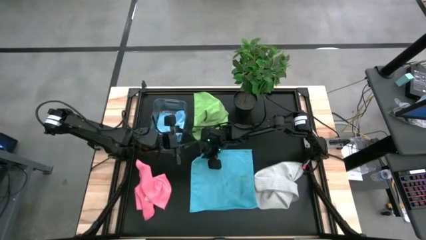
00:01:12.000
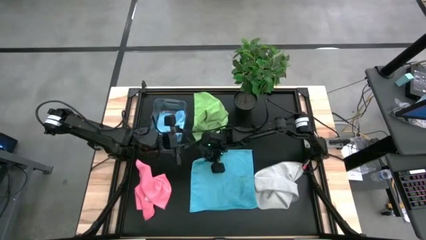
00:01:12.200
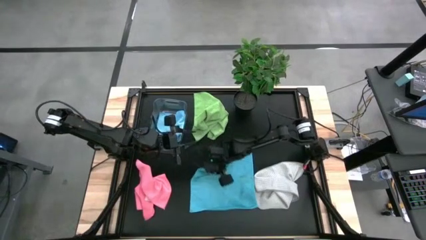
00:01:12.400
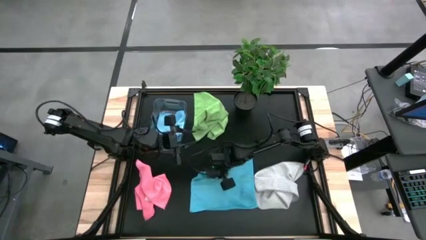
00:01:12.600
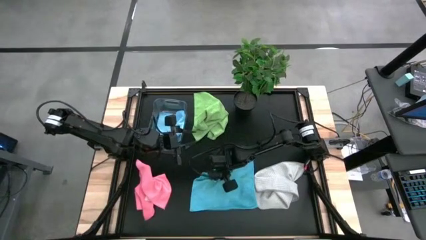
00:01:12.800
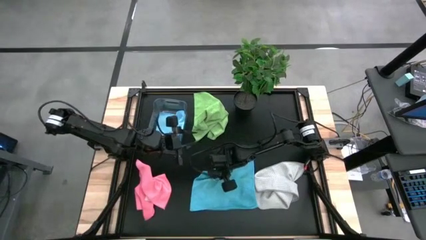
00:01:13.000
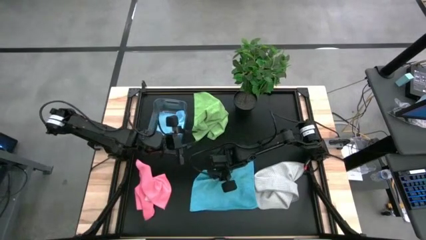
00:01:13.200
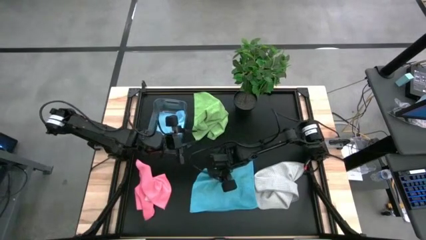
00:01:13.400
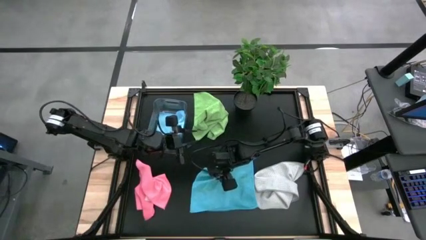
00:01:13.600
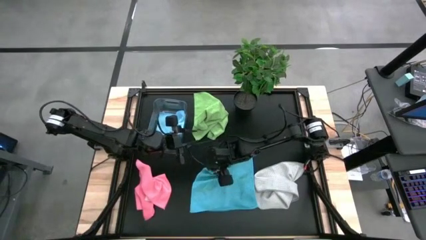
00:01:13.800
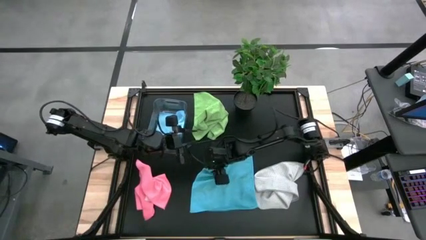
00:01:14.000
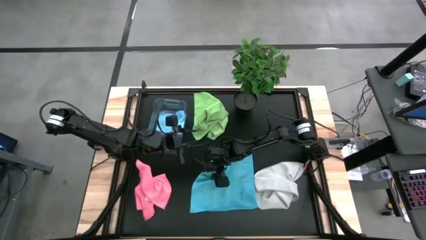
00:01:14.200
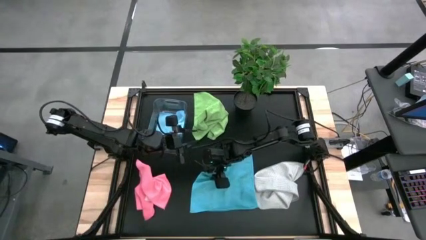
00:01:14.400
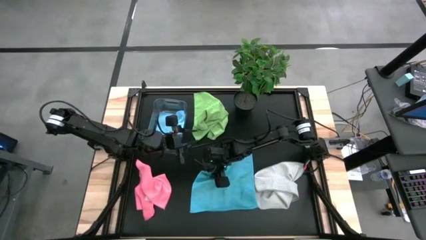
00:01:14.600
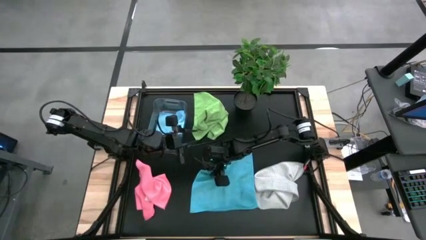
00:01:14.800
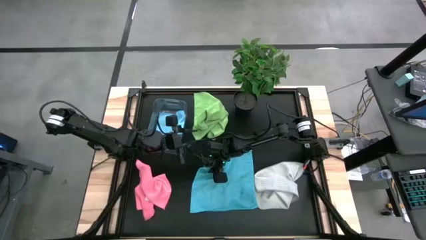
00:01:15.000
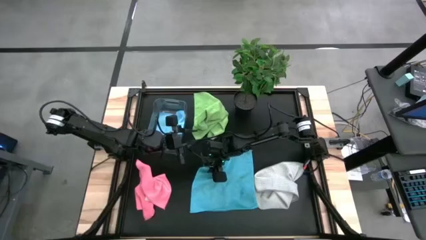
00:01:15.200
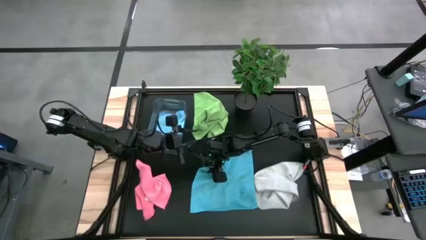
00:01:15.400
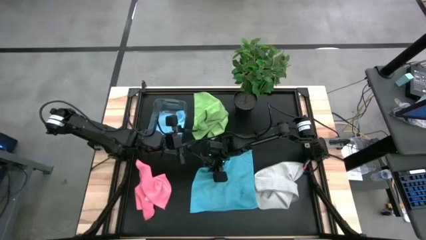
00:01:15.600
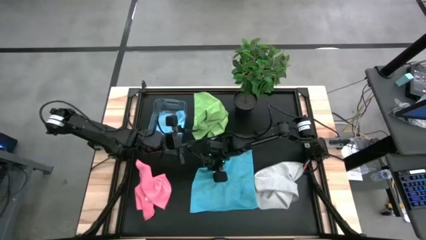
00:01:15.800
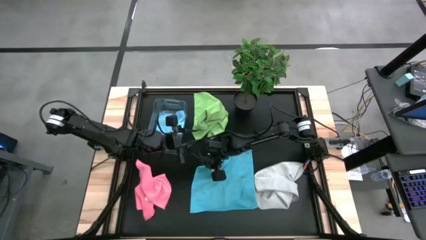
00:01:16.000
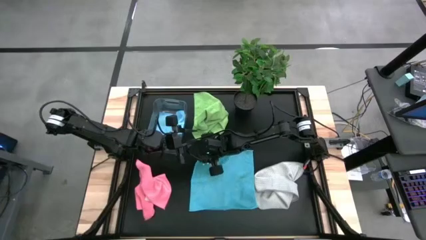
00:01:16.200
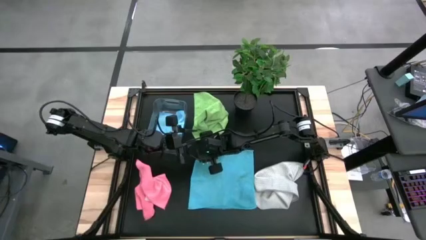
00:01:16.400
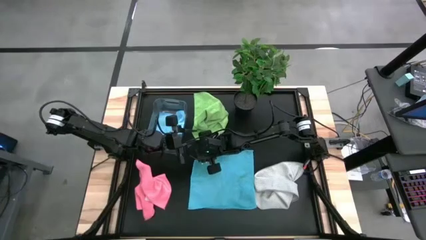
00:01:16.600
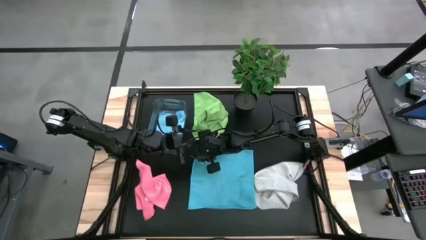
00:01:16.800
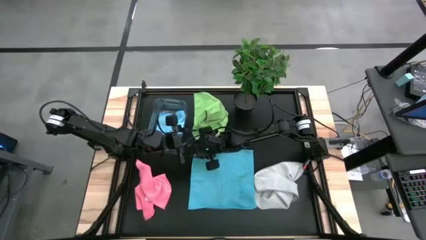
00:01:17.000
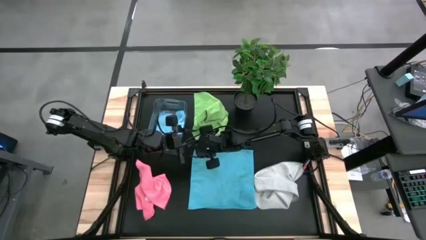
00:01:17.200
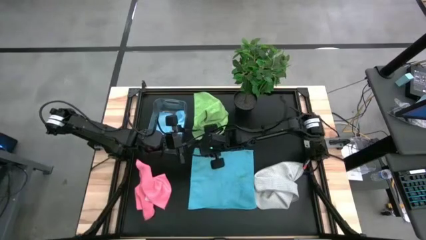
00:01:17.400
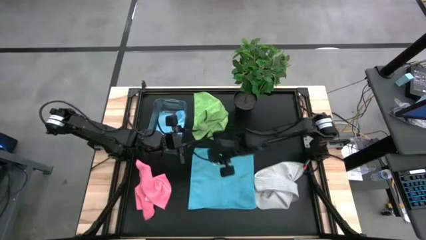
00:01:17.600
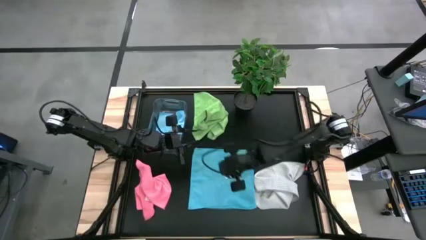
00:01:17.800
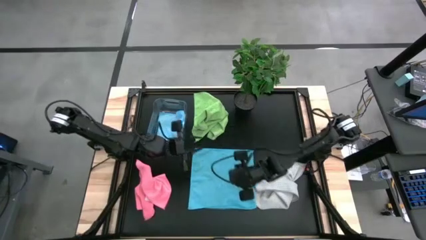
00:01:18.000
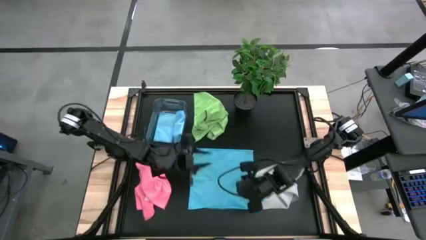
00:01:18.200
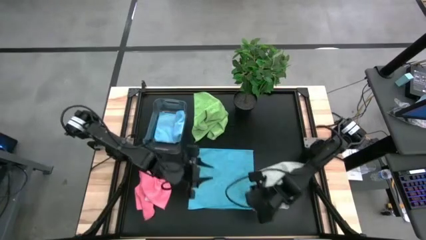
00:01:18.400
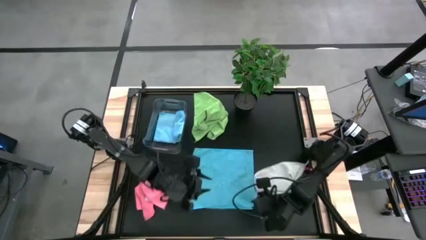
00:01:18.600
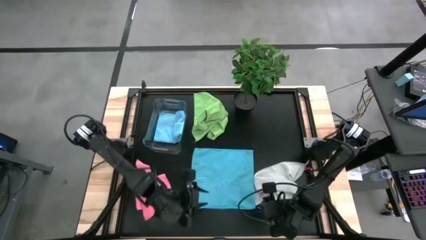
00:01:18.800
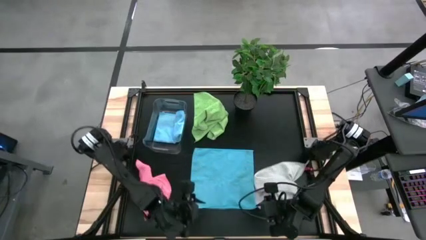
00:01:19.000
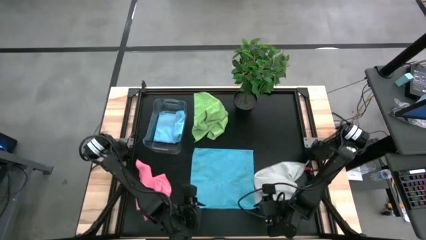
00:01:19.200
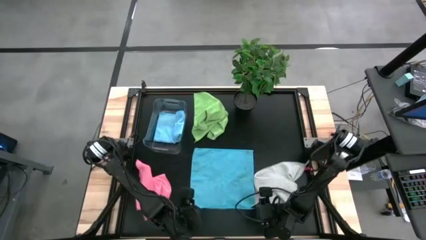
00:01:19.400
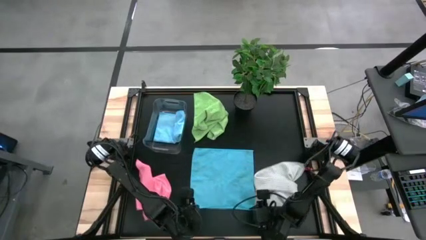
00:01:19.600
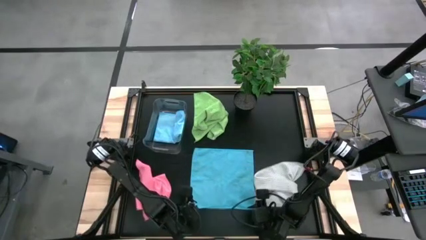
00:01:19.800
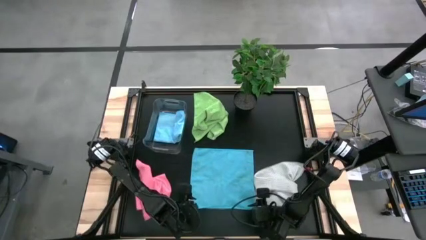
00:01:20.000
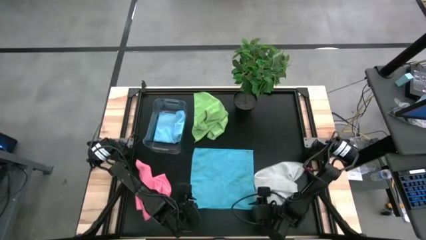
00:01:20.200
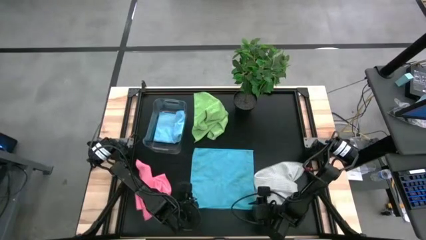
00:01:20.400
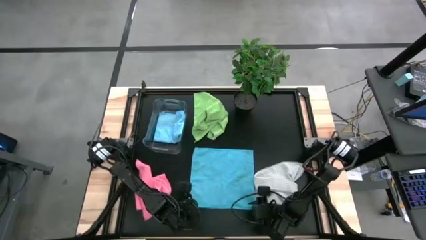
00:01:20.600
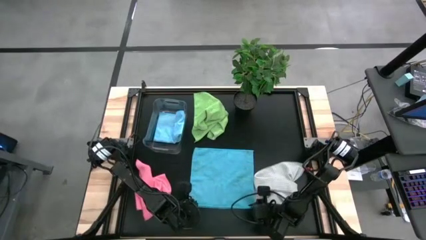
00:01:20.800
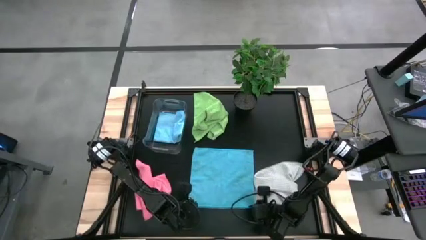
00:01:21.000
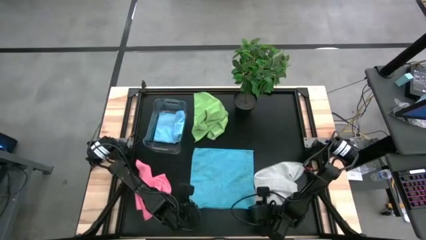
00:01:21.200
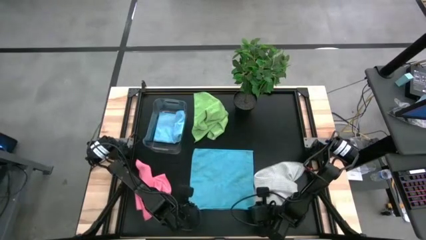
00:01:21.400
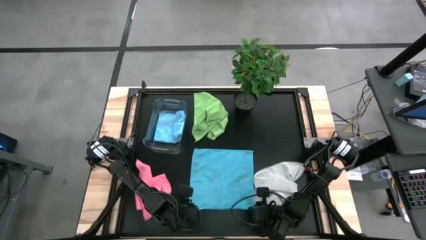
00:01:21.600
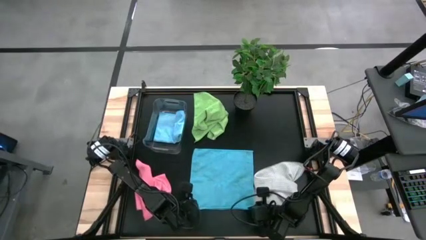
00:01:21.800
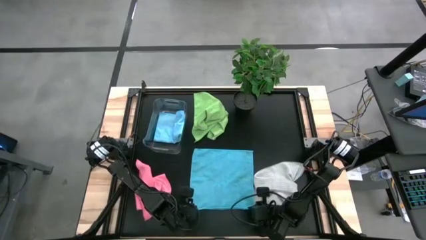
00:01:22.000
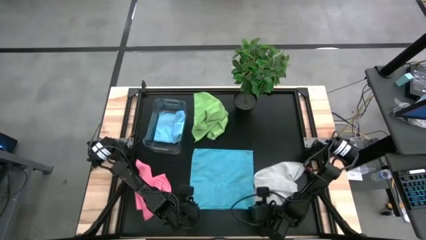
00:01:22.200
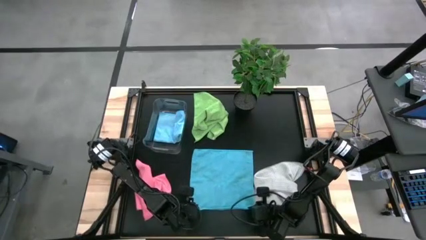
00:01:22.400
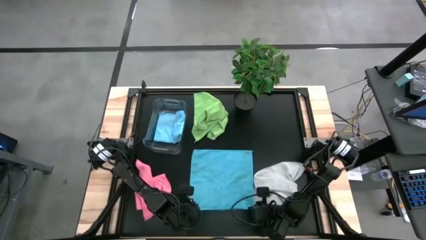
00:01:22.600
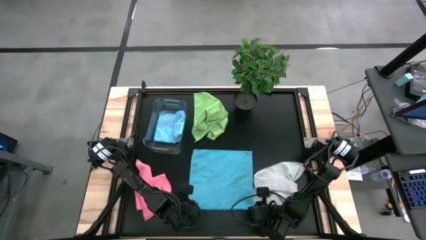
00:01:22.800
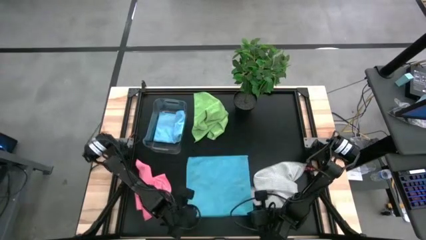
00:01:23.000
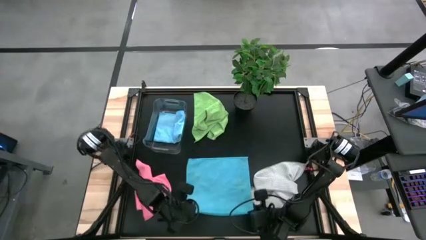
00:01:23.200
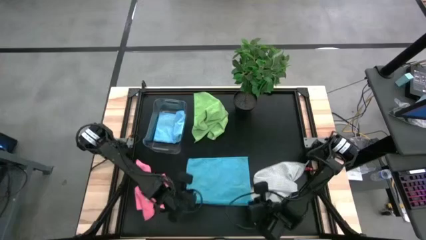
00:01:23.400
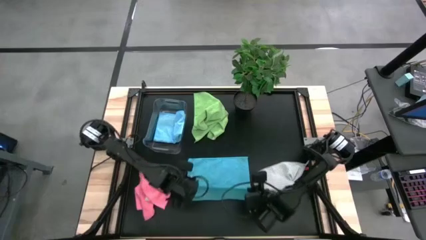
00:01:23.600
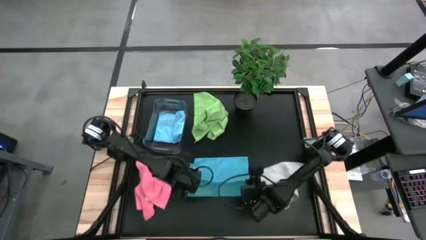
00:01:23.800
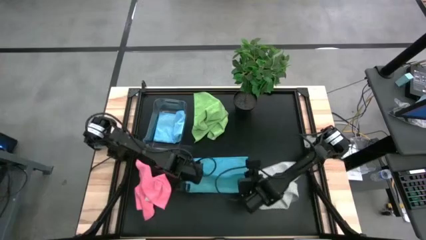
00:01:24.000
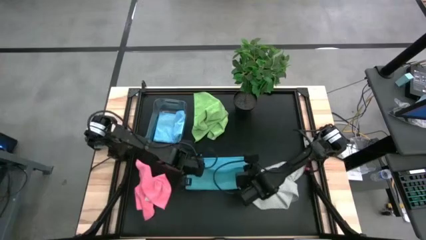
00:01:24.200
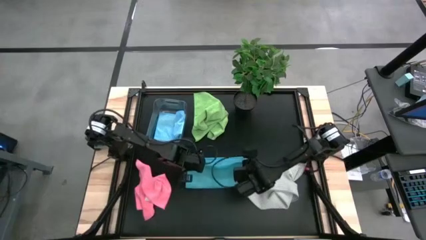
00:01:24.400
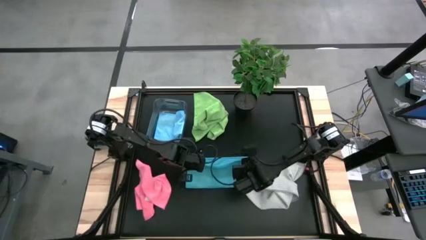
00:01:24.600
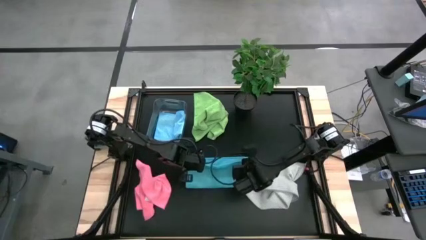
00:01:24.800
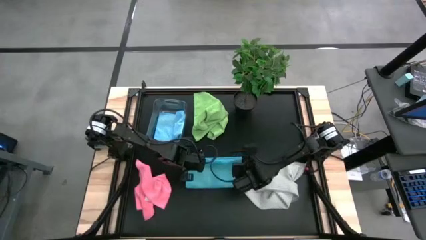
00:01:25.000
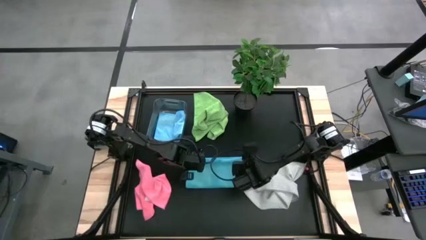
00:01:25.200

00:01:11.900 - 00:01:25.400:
Task: Fold microfiber towels
Fold the blue microfiber towel

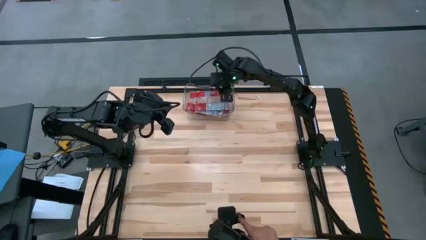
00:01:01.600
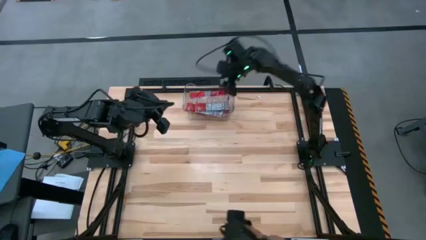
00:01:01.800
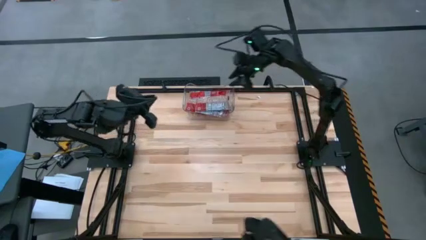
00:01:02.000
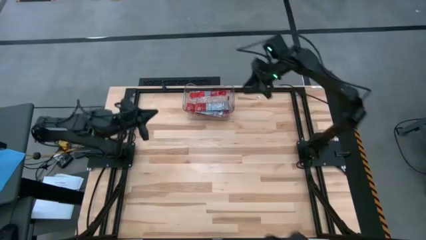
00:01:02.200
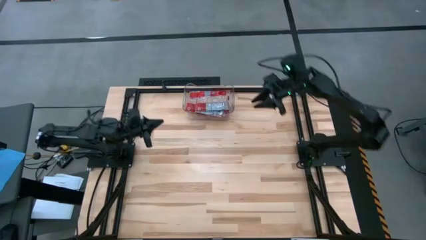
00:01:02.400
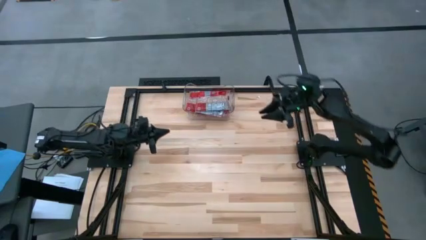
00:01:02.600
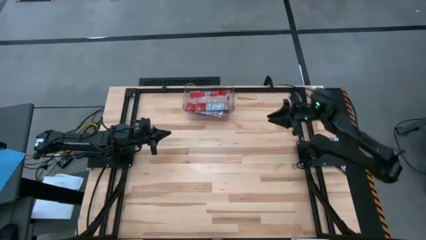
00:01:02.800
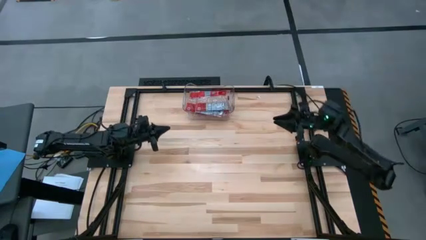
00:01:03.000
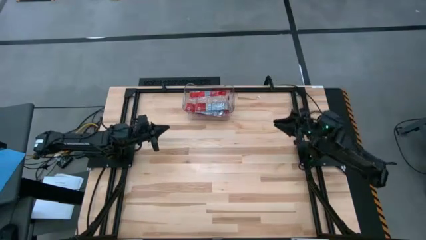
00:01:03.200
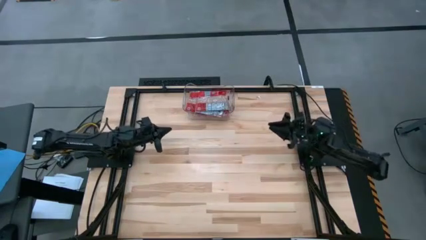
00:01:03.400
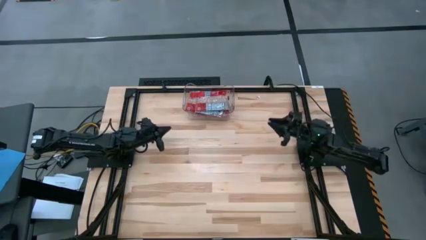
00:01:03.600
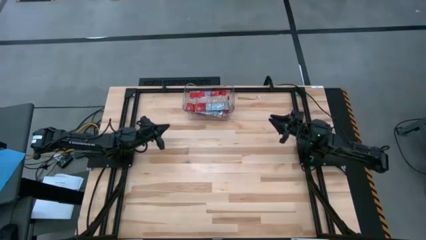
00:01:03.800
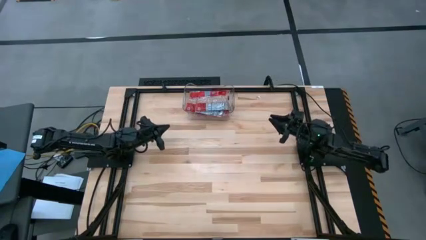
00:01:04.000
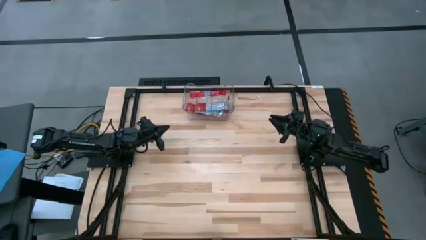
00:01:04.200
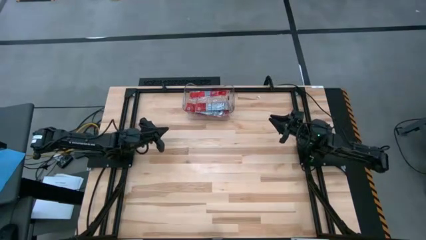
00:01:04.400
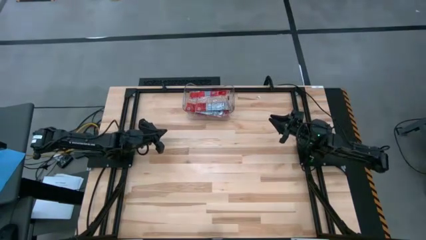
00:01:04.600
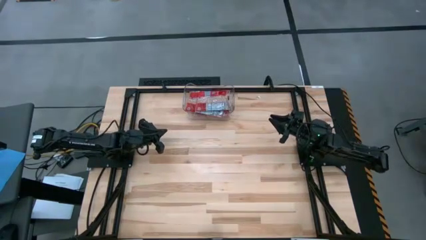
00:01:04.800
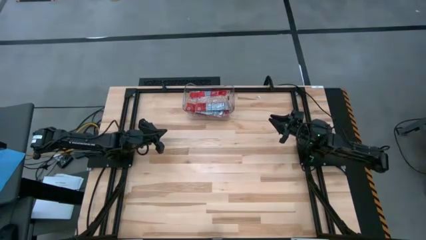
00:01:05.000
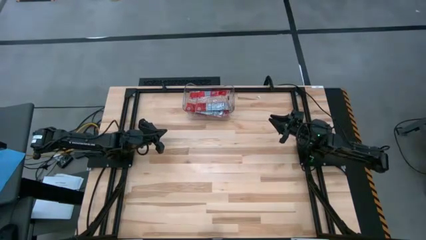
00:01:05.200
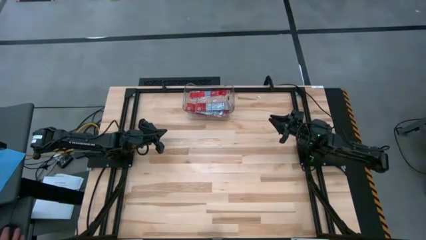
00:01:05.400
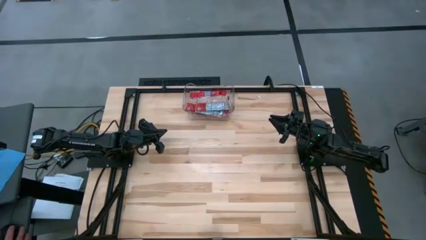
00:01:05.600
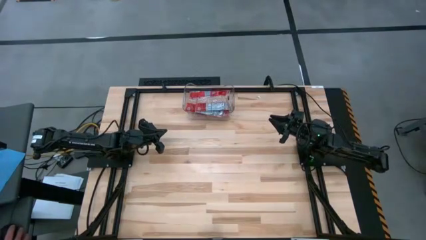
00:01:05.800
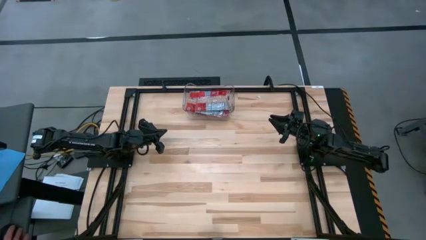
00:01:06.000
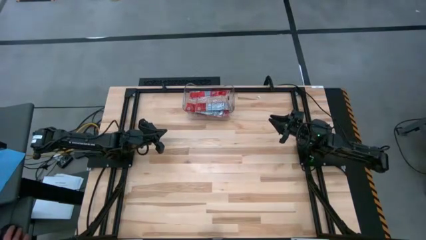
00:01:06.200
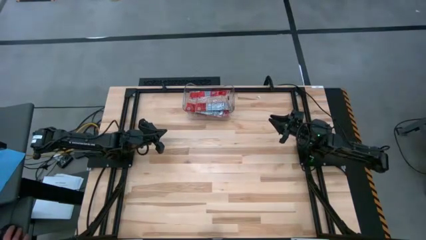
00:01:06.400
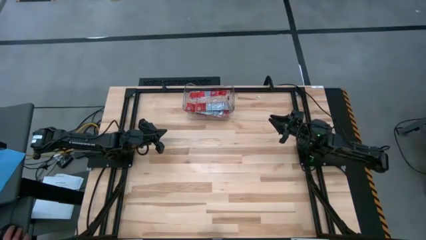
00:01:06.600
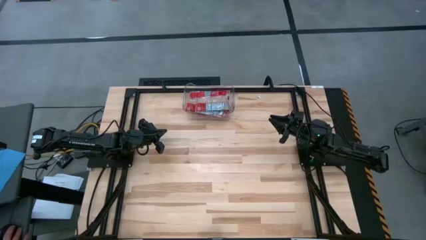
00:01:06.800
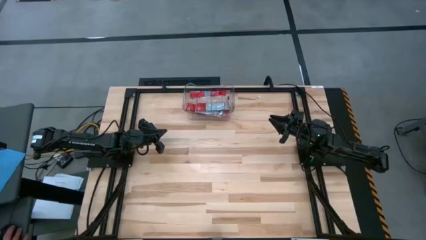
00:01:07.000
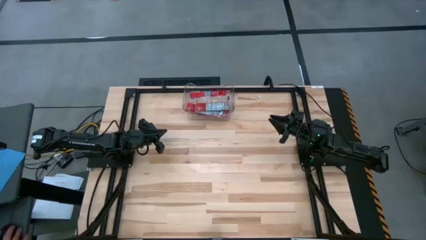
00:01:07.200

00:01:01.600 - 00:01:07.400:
Task: Sort popcorn bags into baskets
Return to Home Position
